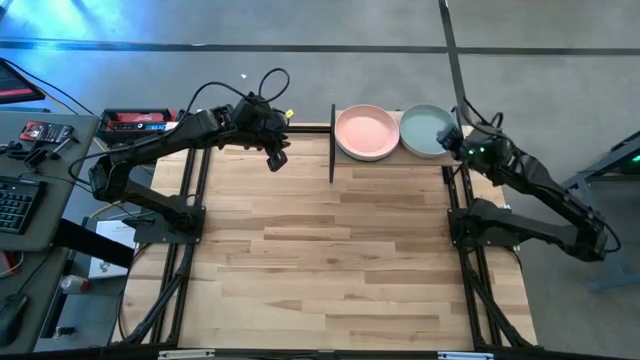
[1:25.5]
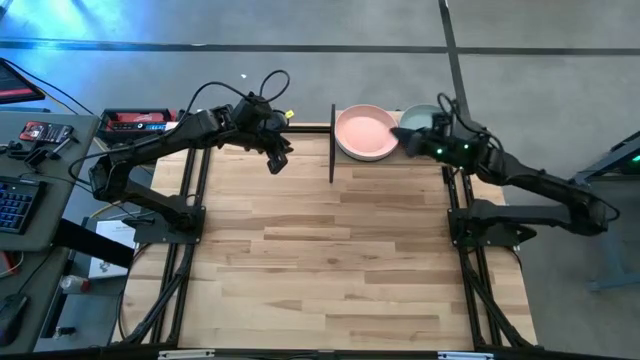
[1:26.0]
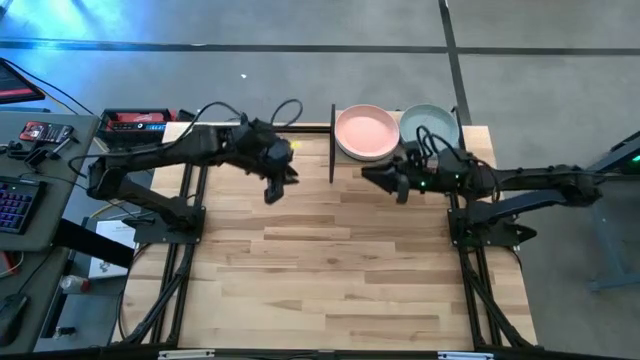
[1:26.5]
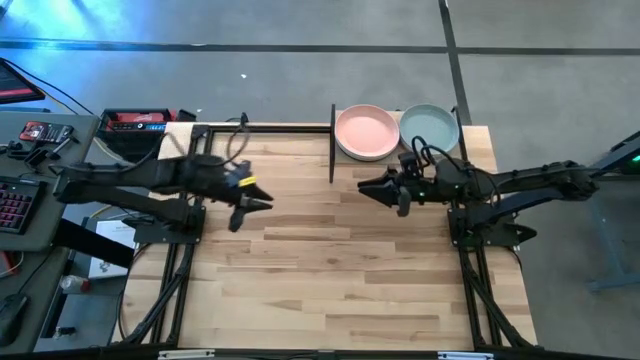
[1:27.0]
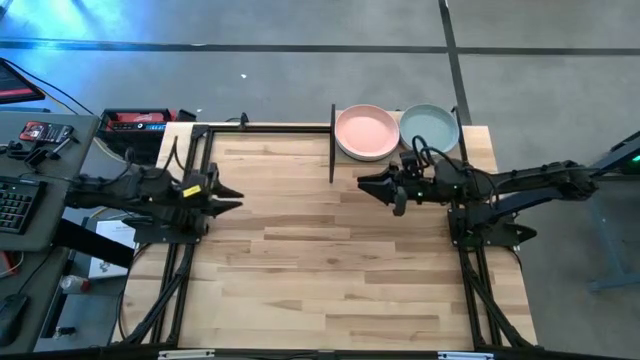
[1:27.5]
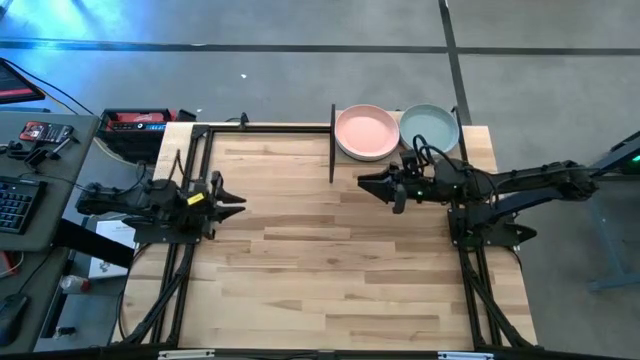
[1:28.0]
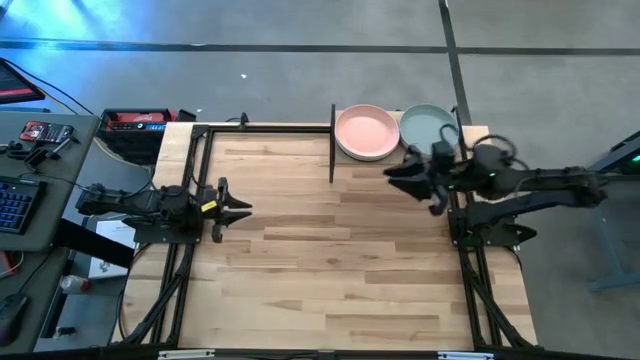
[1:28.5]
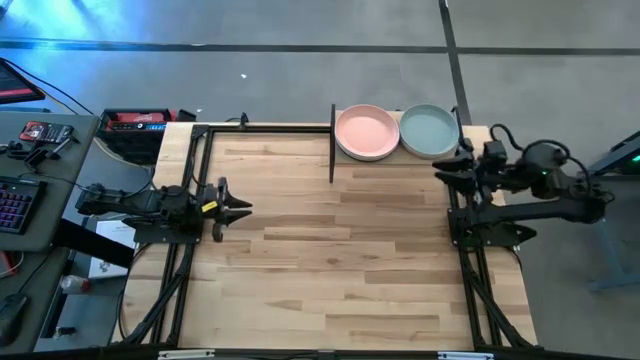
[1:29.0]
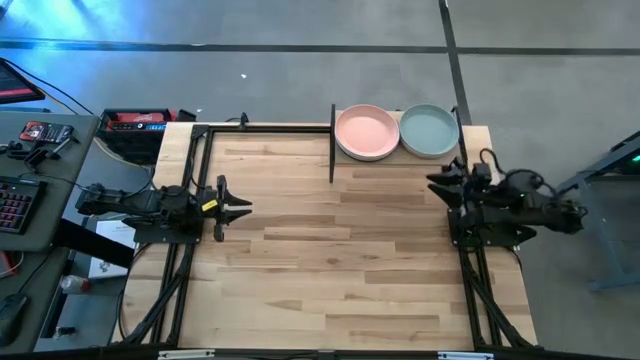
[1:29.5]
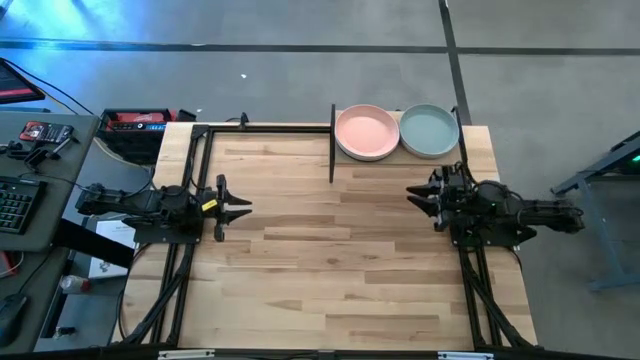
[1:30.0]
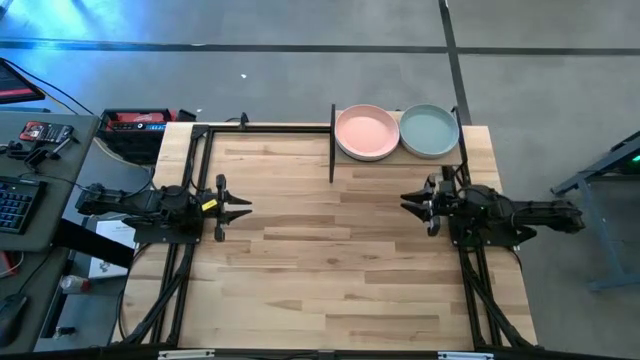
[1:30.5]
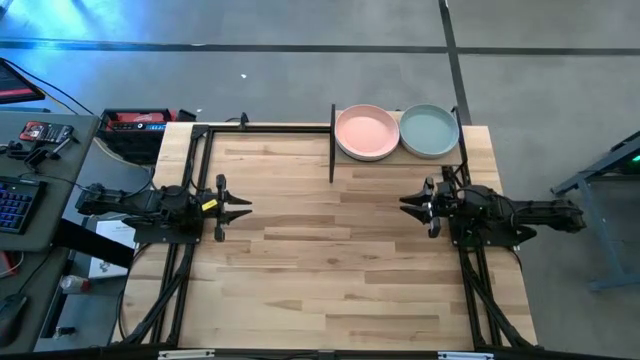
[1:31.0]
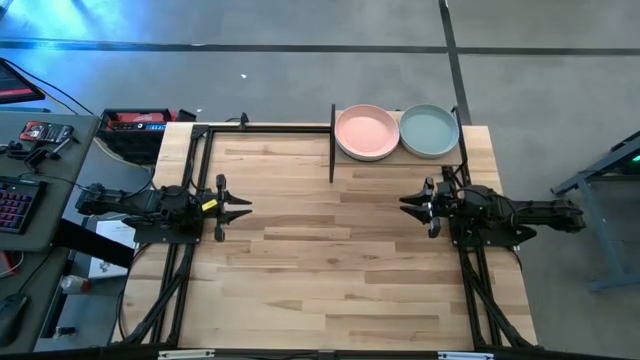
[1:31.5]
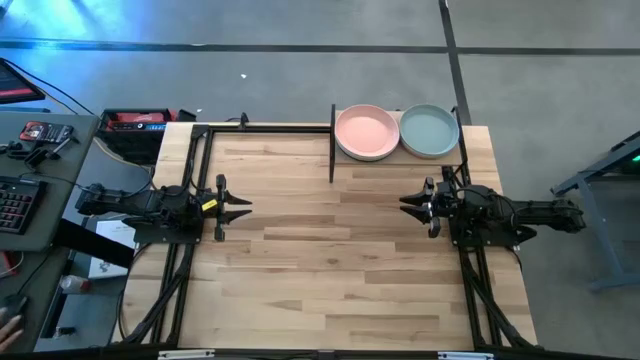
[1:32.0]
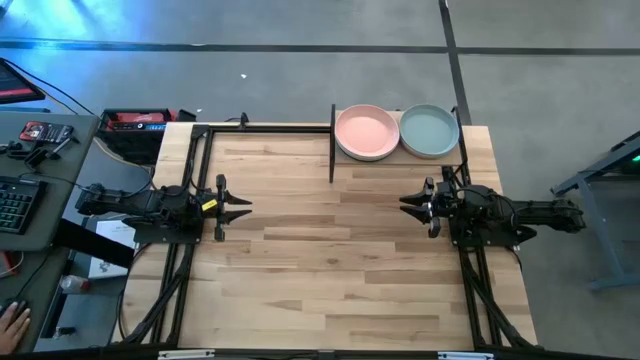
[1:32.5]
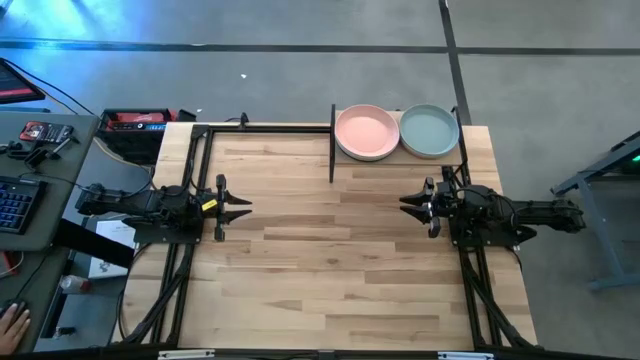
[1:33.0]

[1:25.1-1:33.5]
Task: Place and stack plates onto a shelf
Return to Home Position

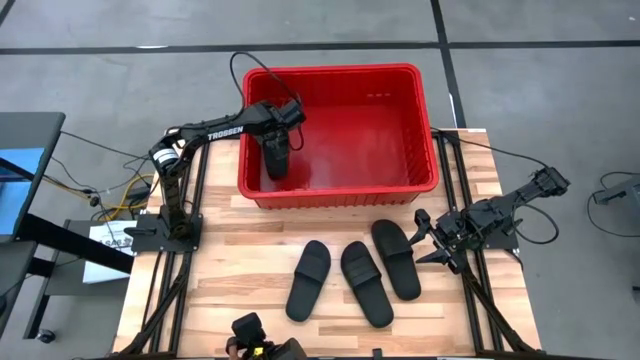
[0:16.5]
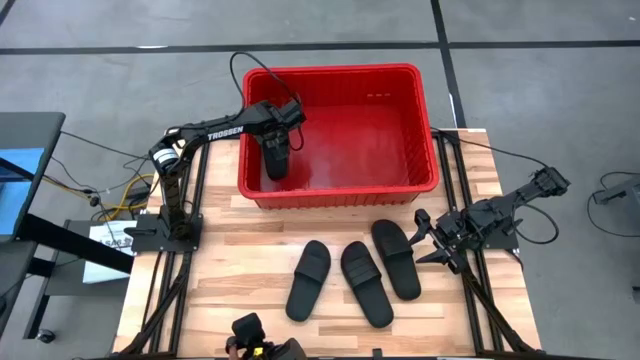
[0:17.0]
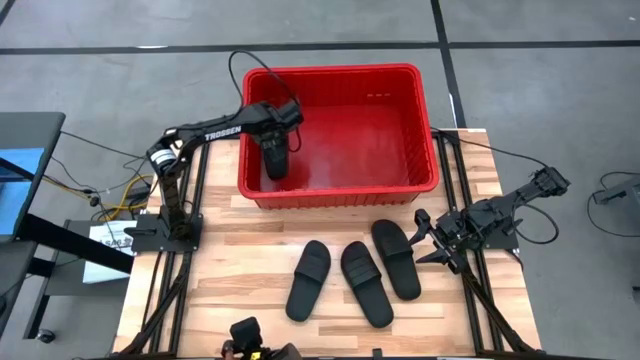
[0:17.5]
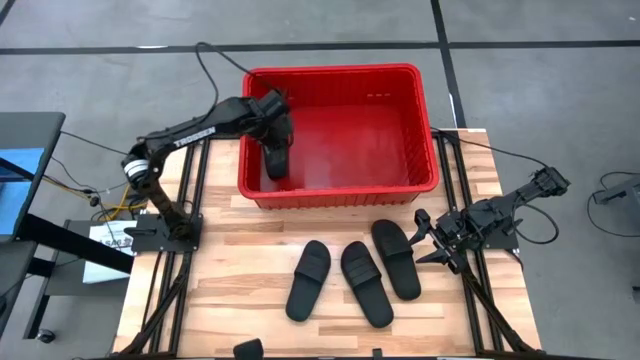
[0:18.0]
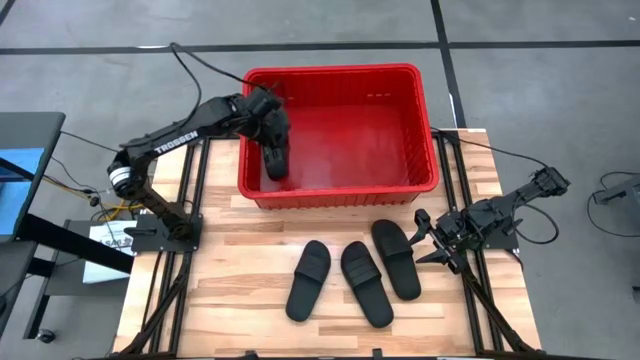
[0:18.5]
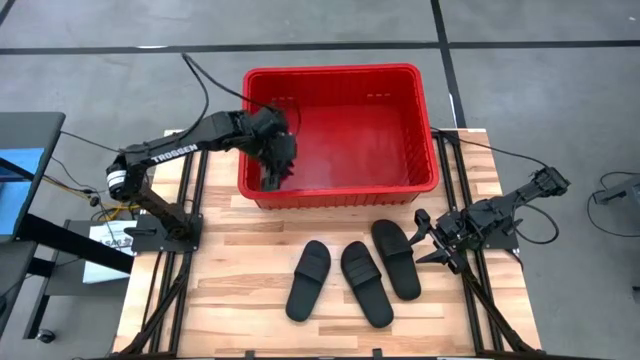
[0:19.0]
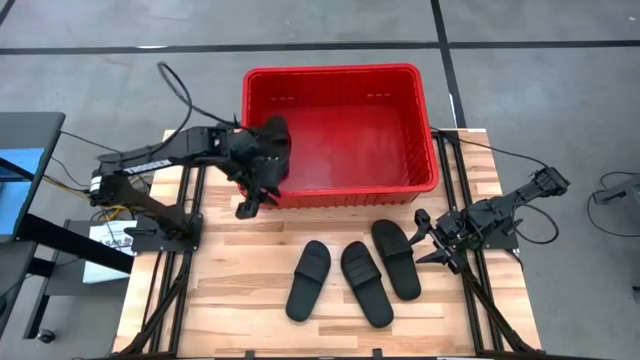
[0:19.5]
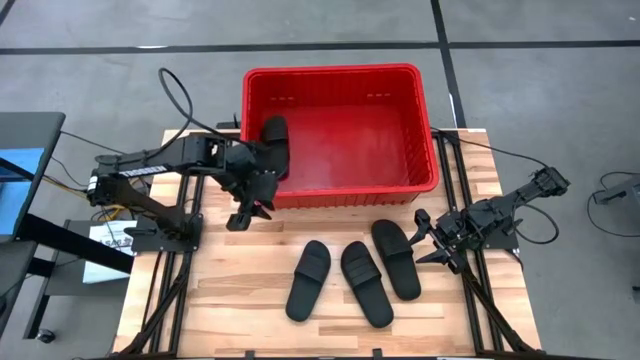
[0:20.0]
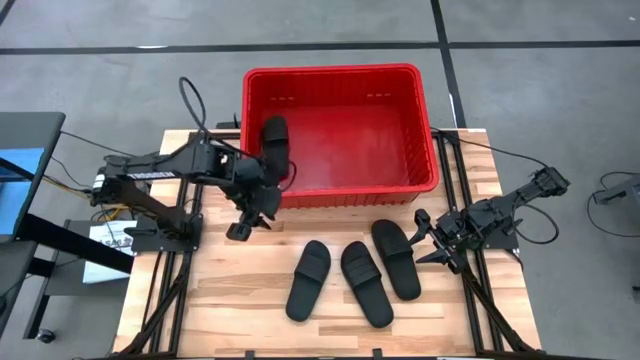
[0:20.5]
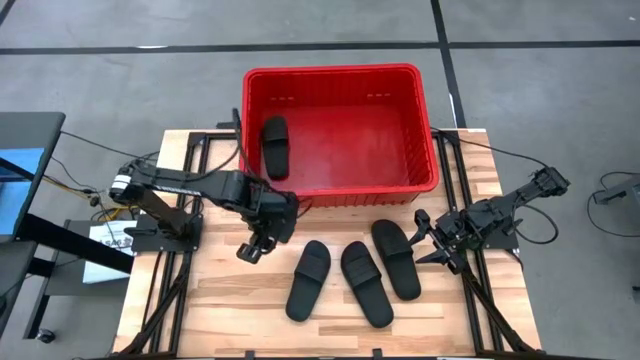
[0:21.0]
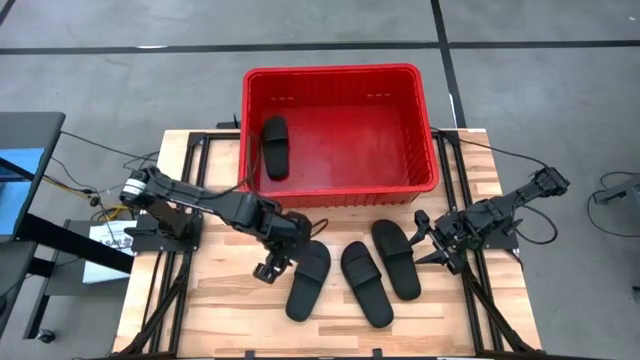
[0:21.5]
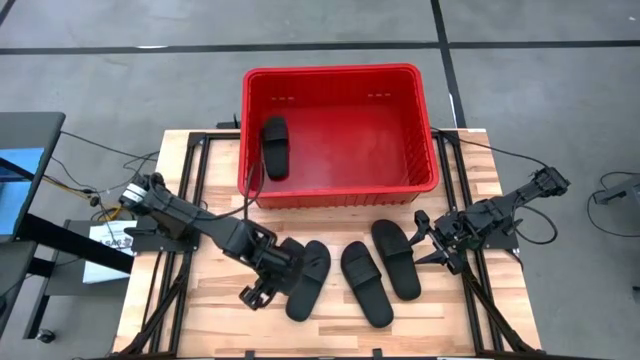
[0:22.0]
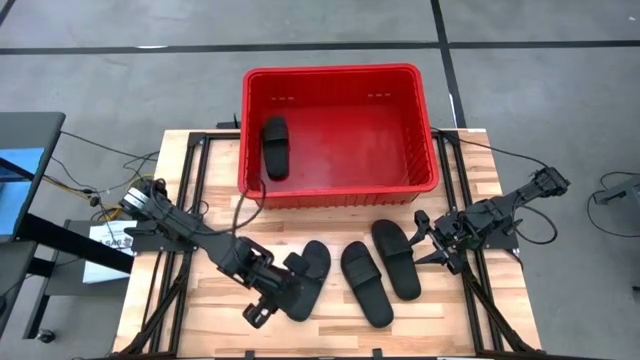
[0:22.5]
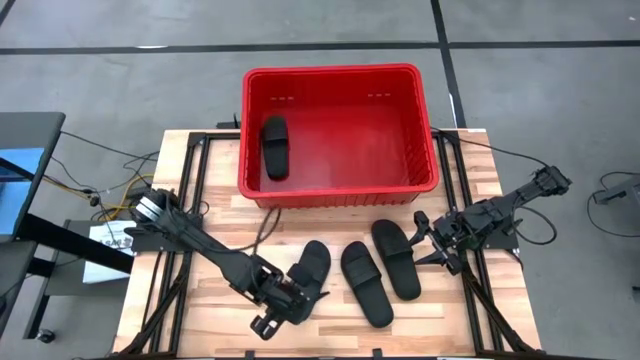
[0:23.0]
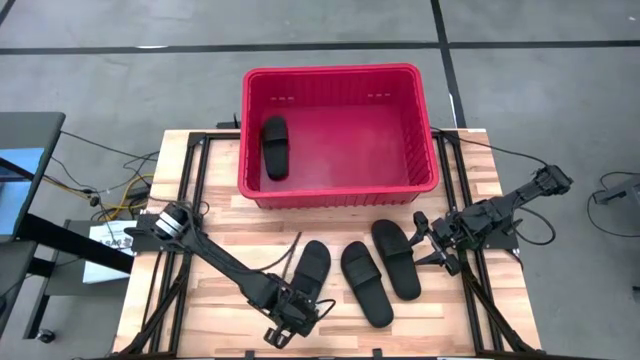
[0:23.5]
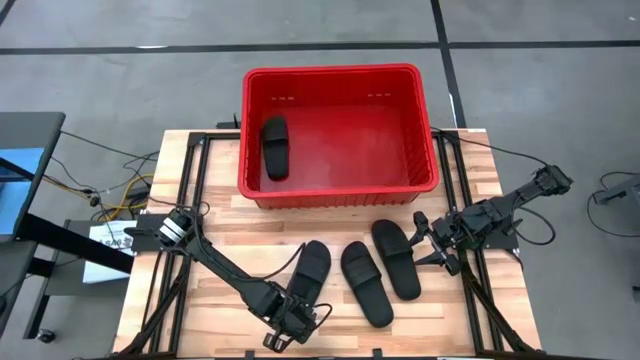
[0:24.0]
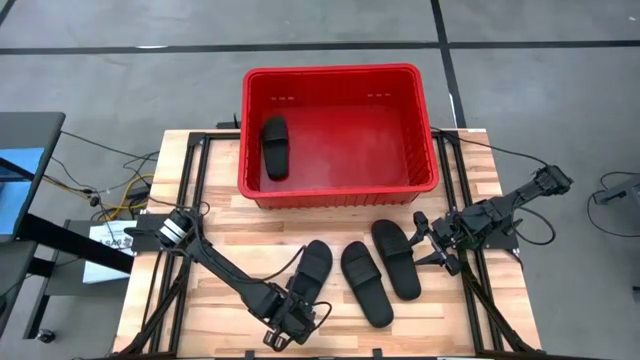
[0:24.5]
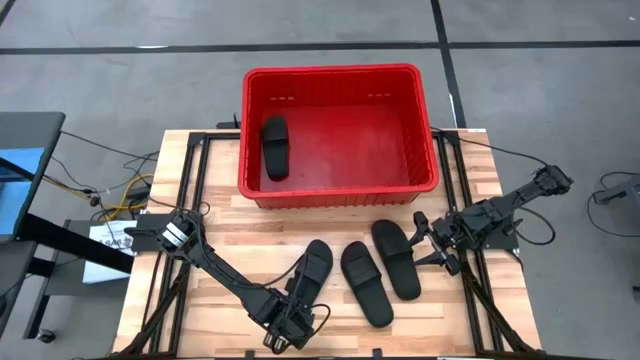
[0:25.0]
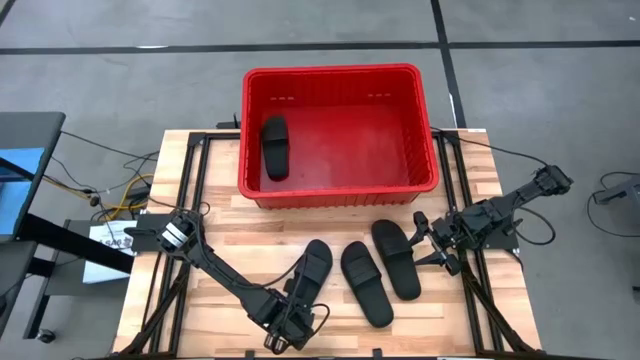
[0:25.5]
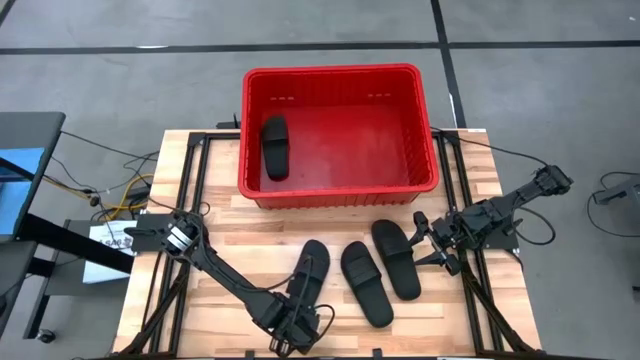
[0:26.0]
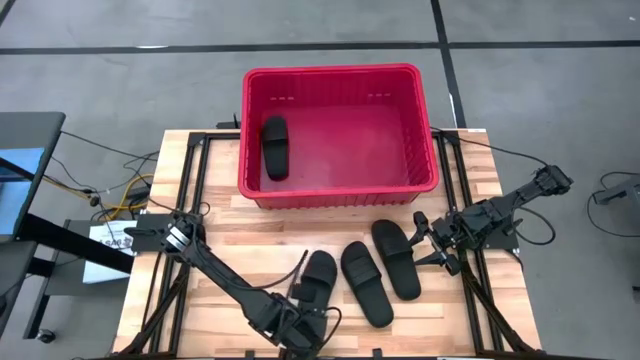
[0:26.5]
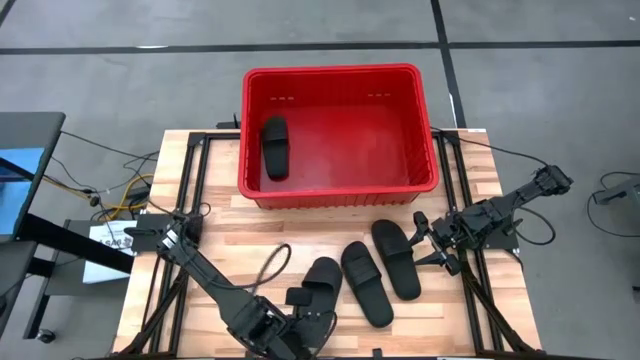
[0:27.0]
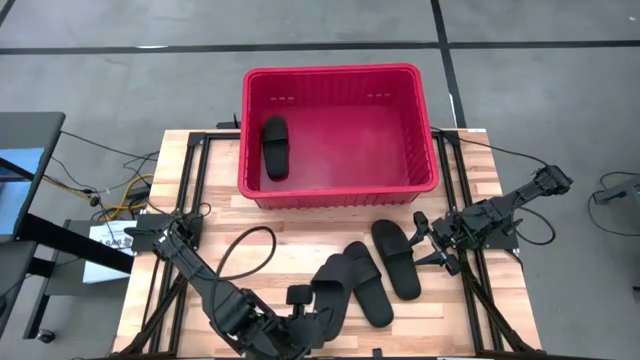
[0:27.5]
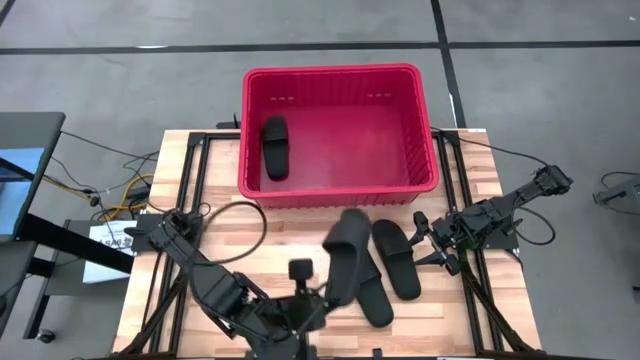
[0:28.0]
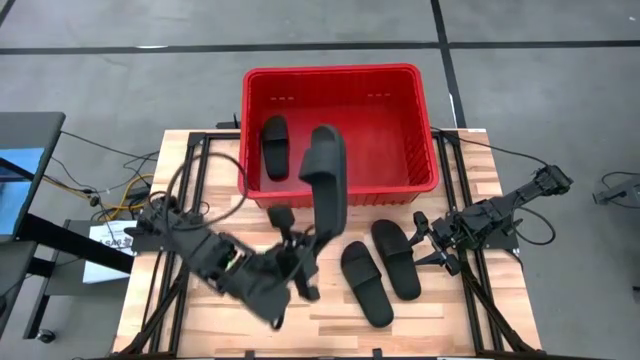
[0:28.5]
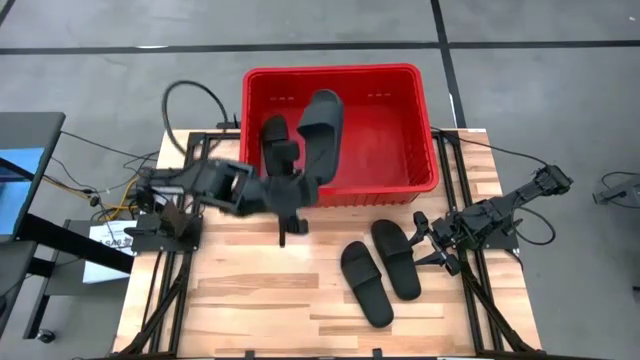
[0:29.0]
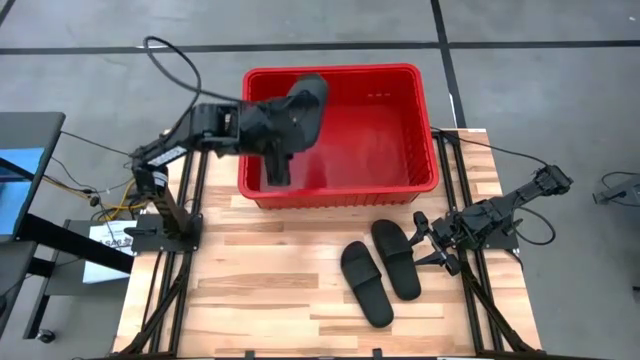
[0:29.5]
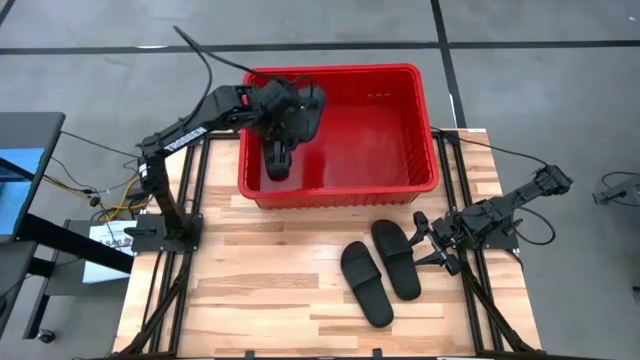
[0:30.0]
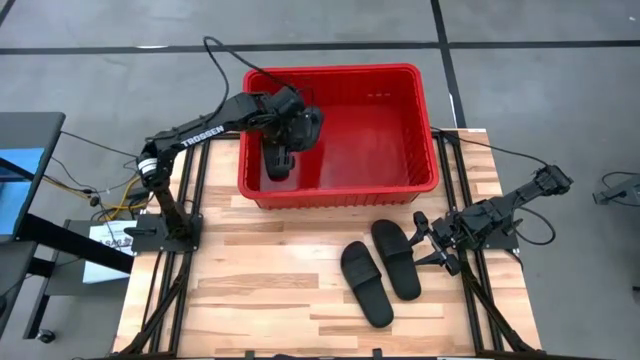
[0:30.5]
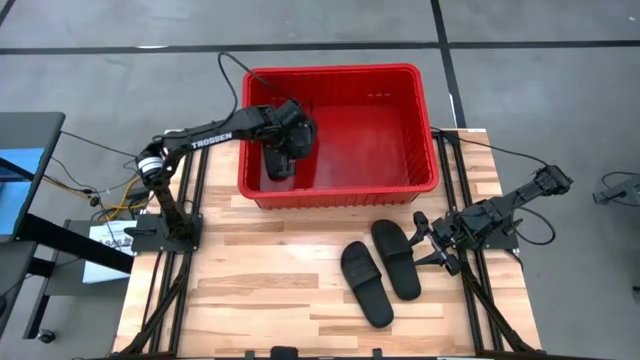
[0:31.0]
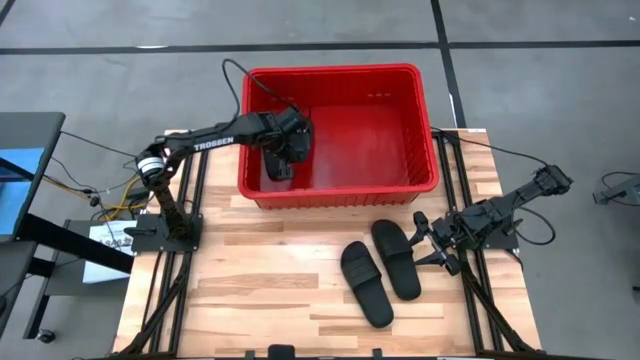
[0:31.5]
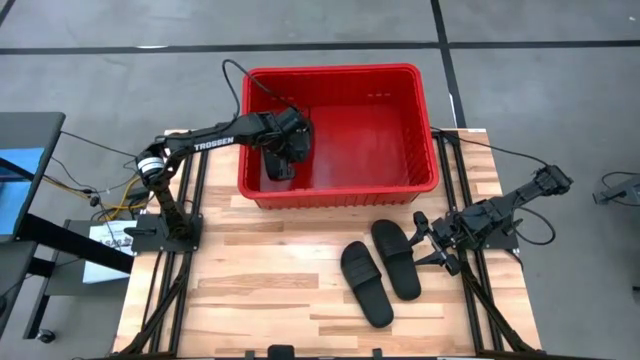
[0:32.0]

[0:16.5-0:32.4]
Task: Pick and place slides into bin
Put the black slipper into the red bin
